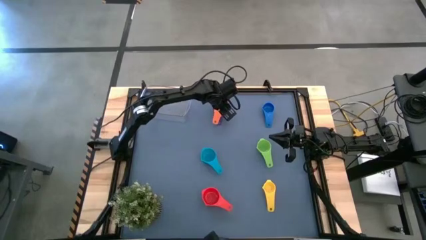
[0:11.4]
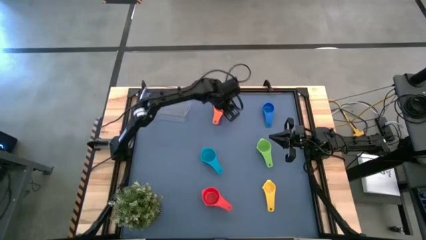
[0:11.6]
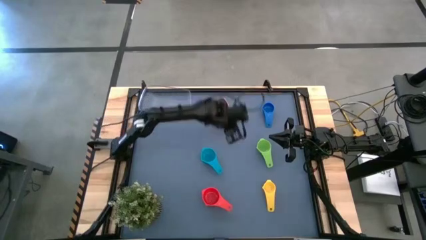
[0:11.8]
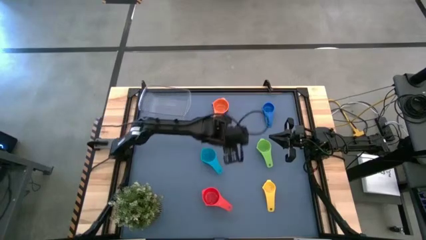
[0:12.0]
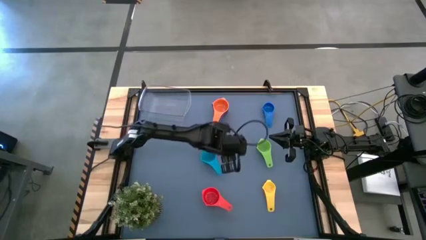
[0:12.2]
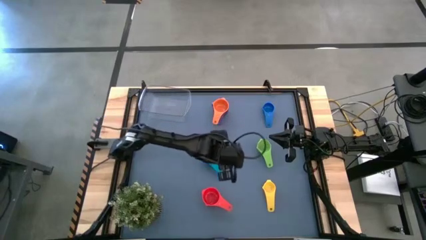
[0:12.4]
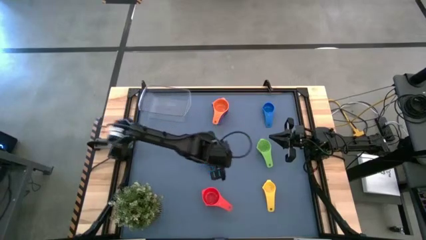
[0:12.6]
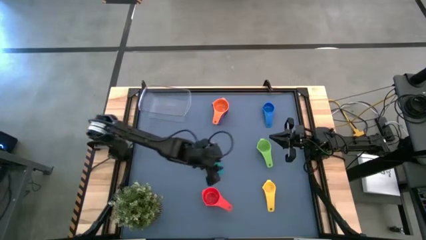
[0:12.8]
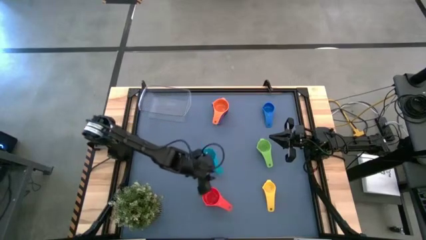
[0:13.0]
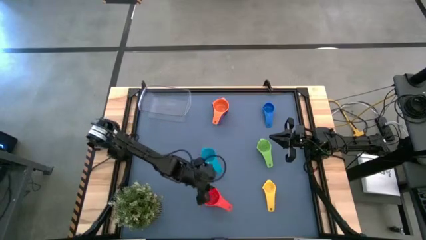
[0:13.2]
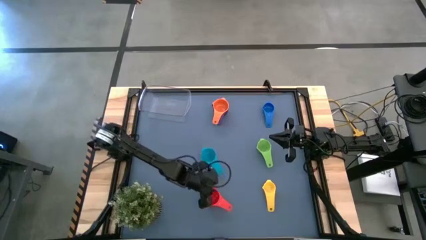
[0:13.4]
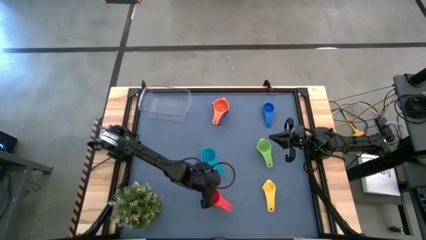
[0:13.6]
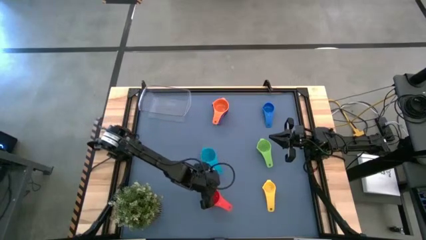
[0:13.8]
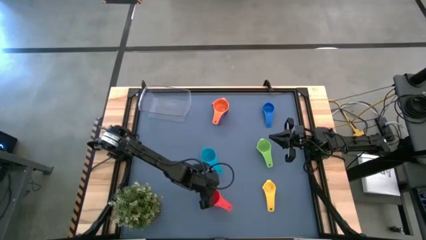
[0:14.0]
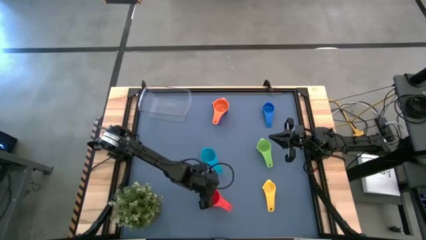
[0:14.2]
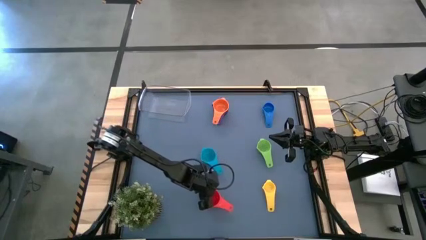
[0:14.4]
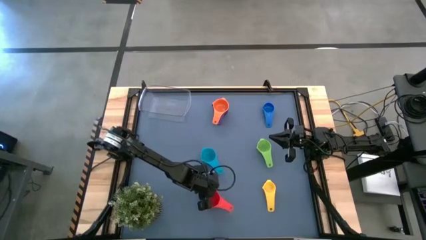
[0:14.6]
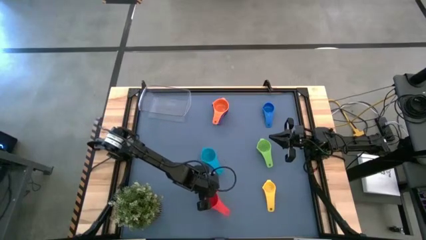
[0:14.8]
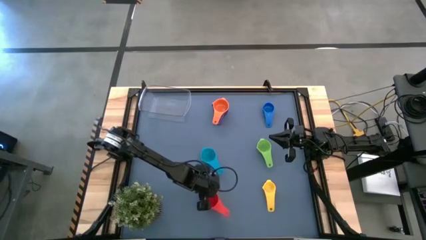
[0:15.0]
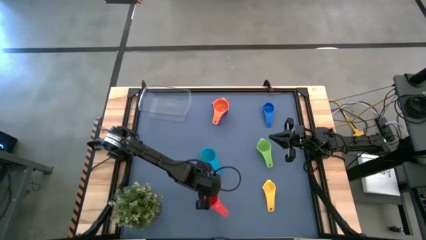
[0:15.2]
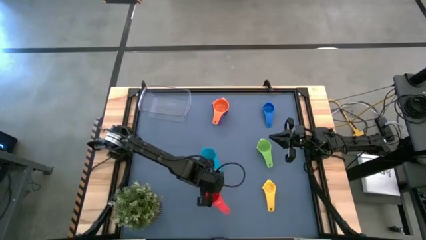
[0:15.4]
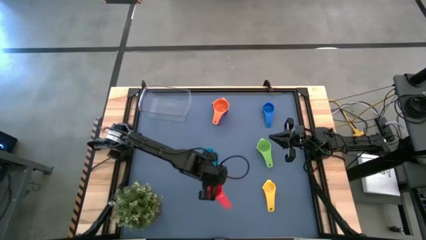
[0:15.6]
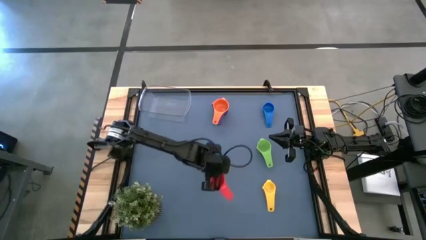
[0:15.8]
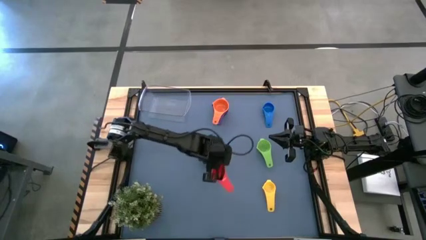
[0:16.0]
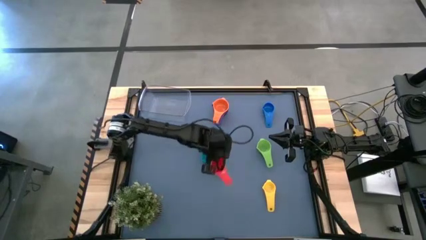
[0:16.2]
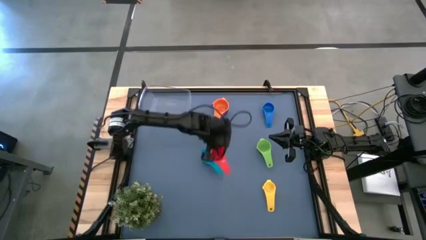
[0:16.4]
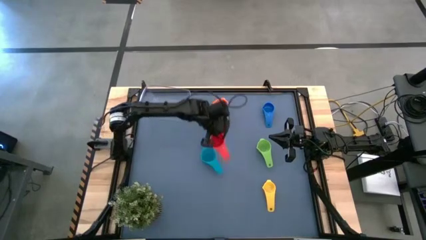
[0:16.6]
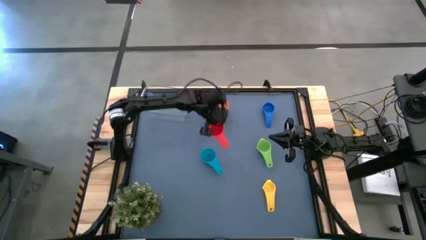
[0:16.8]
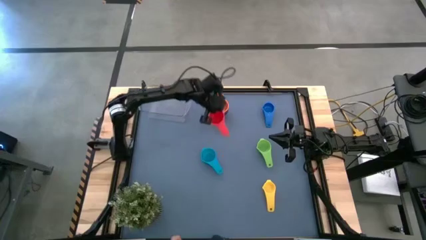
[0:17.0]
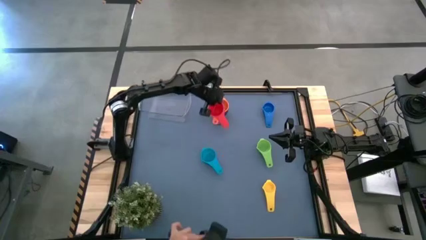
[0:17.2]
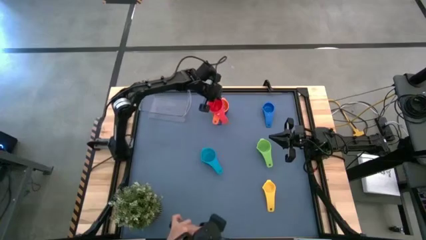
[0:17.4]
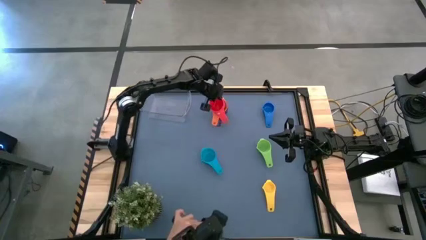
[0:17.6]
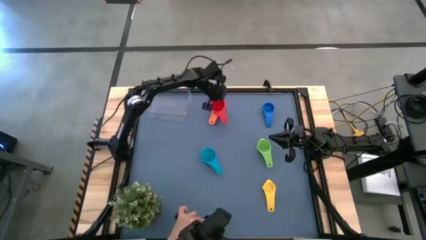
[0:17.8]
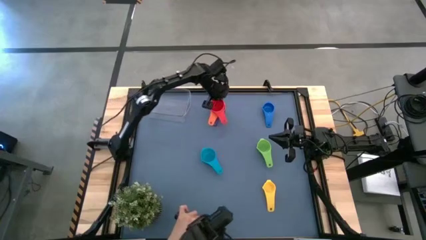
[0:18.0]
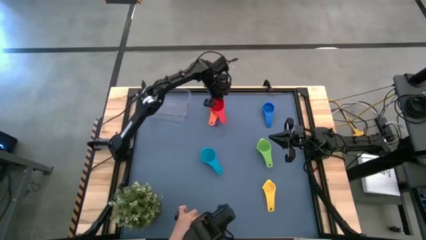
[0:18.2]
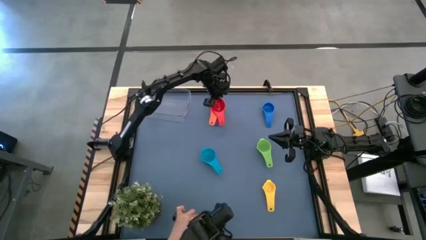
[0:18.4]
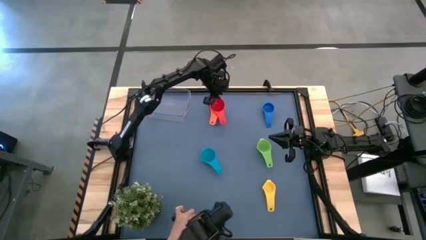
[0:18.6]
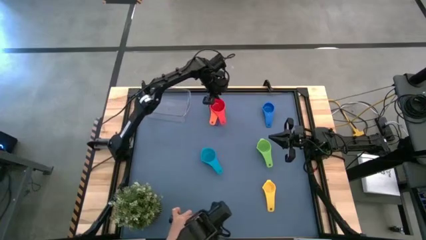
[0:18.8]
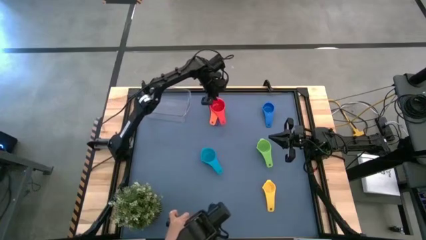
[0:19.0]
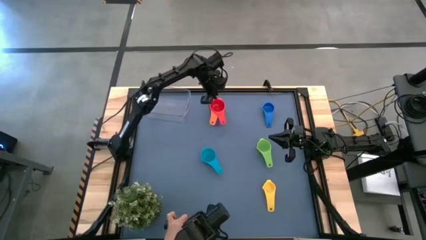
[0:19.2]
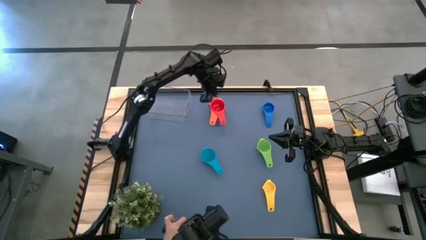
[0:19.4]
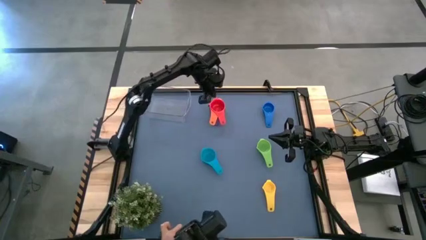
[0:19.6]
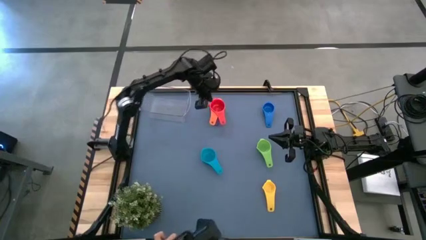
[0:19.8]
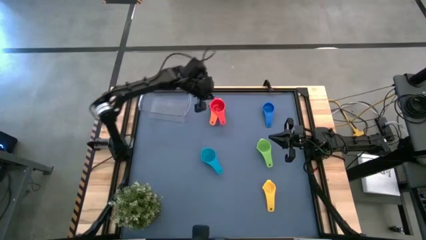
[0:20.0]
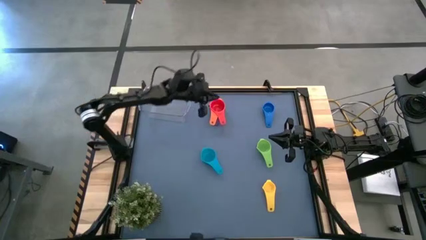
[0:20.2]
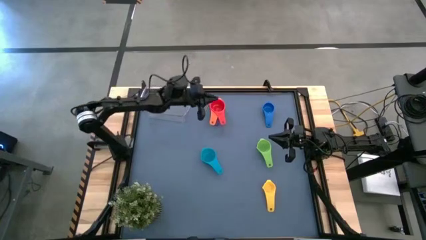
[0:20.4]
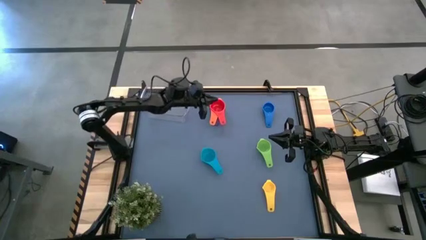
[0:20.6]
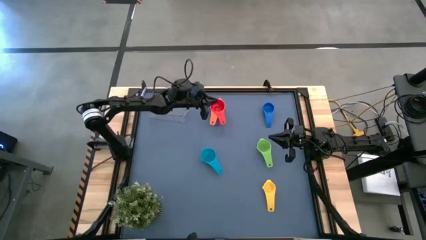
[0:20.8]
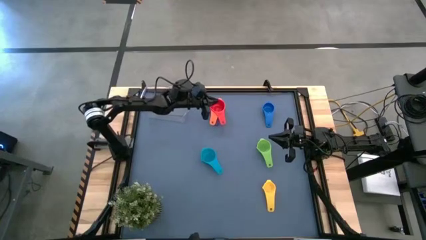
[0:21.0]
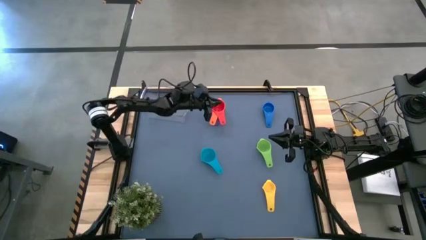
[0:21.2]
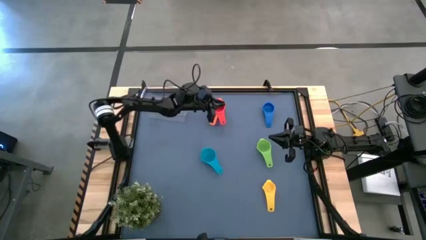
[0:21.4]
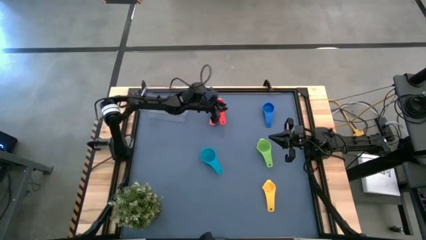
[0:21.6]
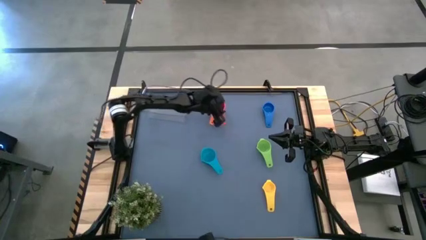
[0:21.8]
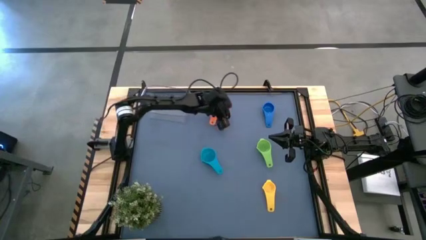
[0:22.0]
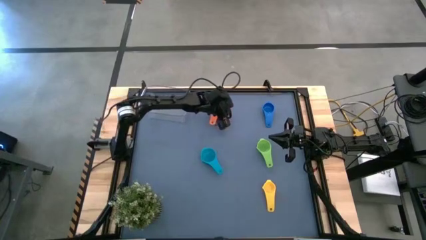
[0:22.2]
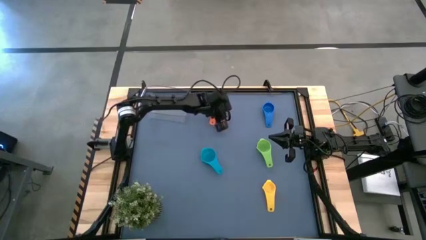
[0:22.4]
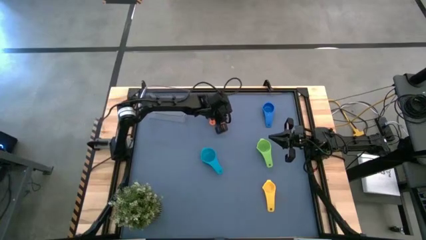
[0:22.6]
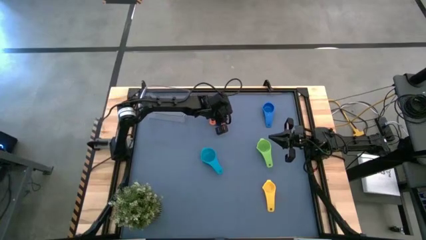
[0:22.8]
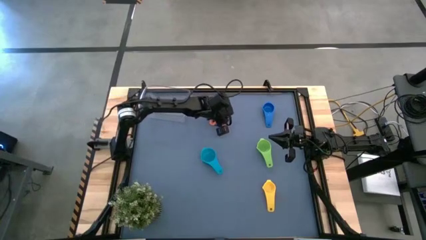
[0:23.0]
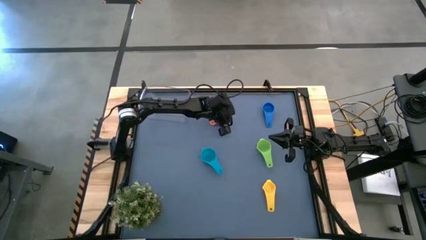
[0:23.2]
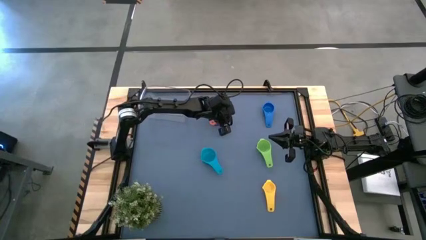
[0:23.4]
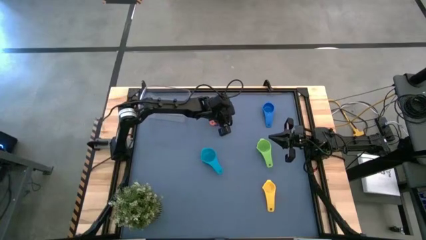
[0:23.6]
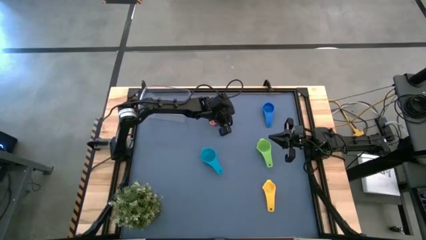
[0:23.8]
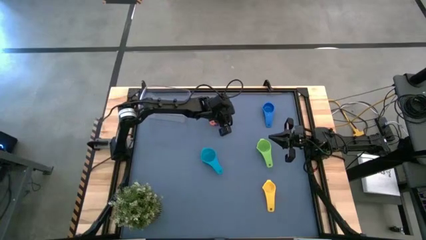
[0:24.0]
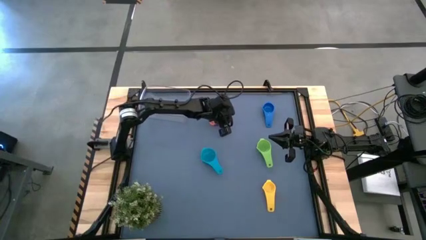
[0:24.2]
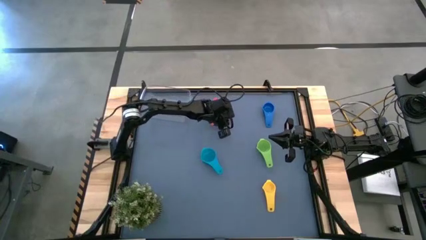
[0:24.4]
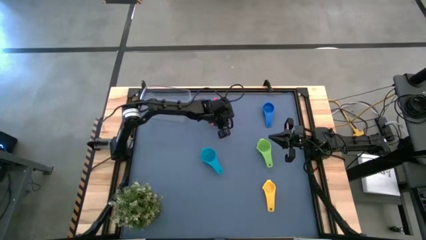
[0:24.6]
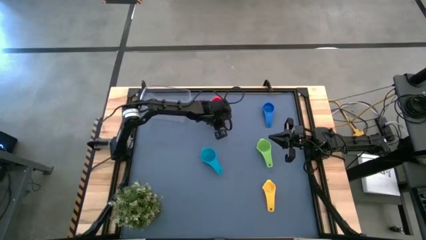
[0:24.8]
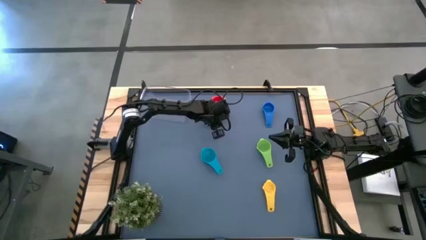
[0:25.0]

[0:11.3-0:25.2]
Task: Nest measuring cups in basket
Stack the red measuring cup on top of the orange measuring cup
